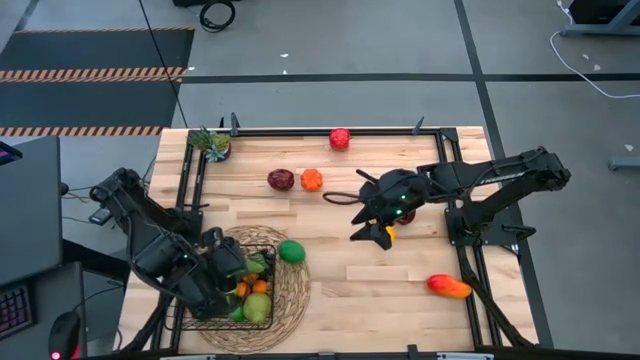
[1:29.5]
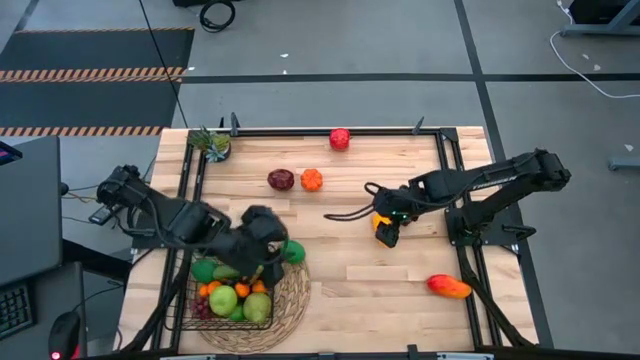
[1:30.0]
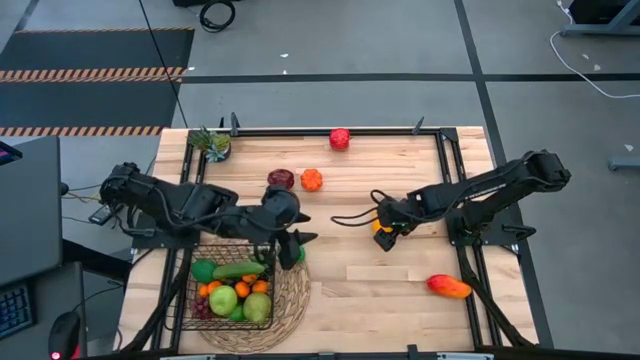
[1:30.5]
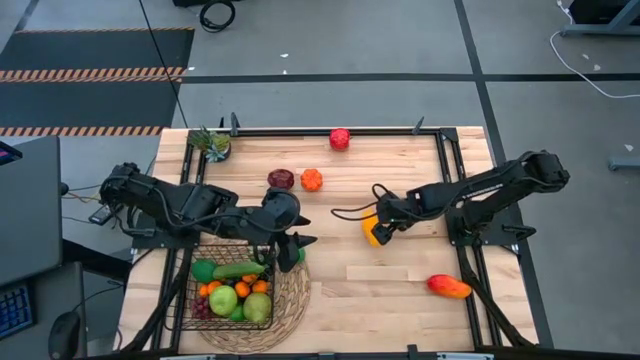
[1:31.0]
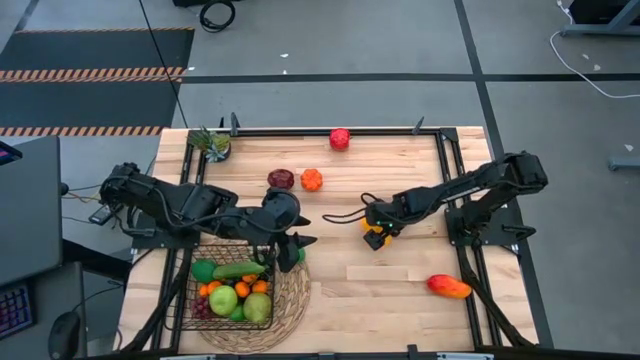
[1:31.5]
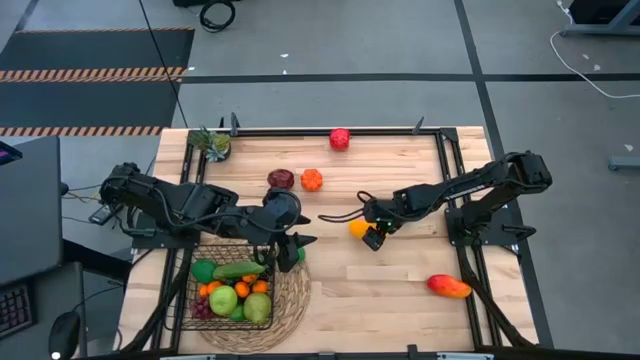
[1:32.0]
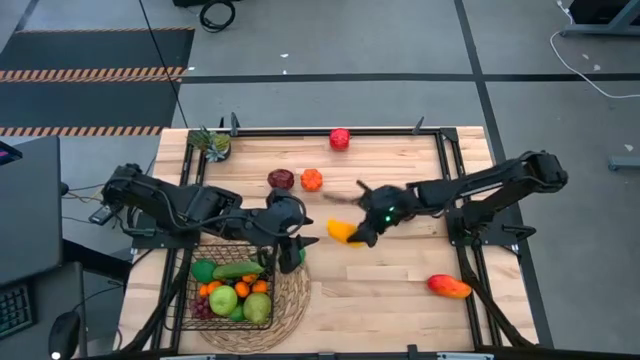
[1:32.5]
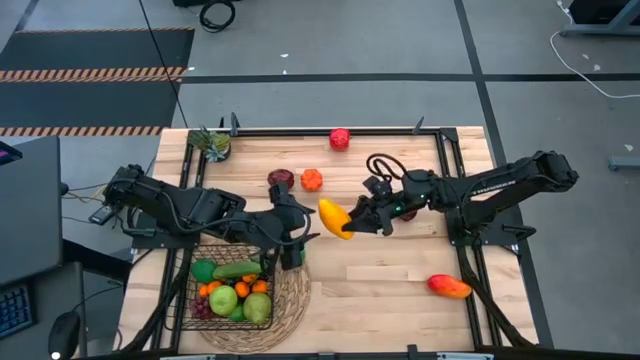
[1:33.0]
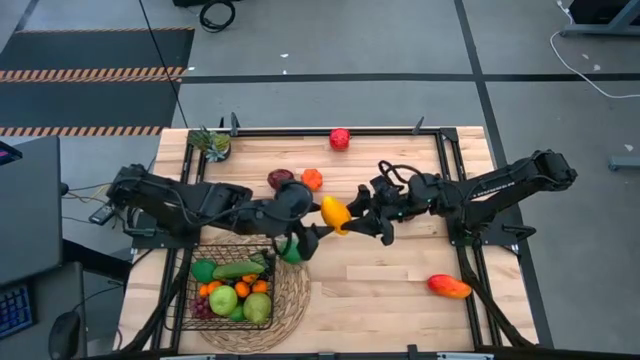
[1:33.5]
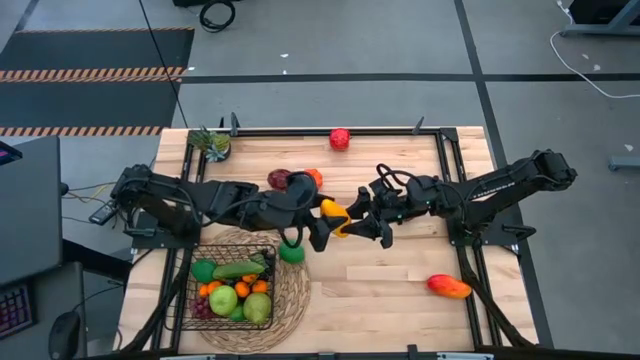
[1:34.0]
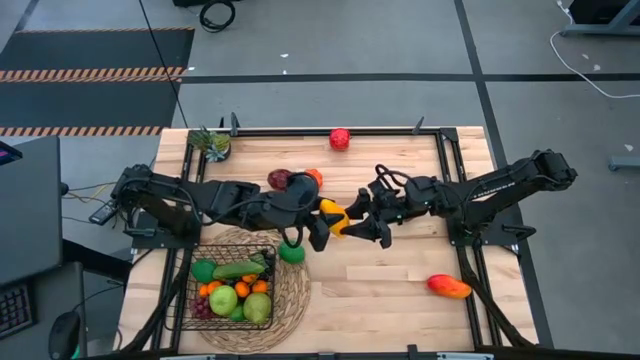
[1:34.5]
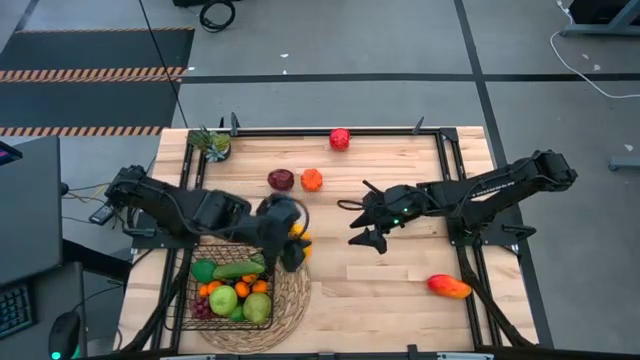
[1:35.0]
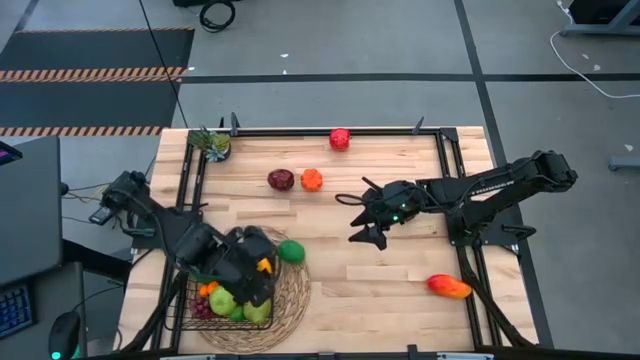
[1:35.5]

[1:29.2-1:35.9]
Task: Build produce basket
Put the yellow mango into the black wire basket

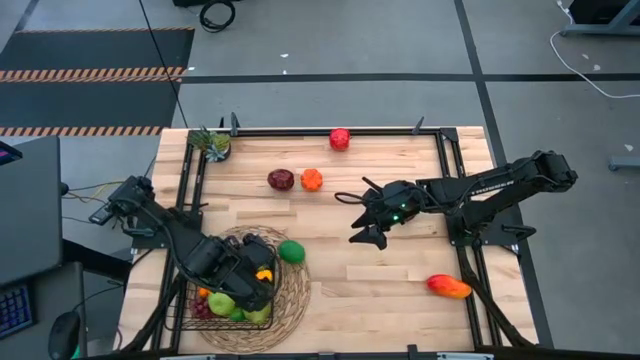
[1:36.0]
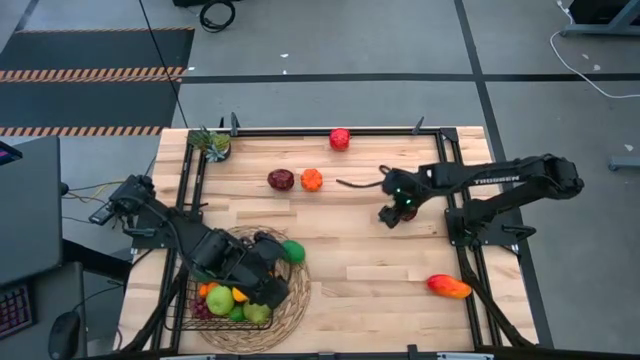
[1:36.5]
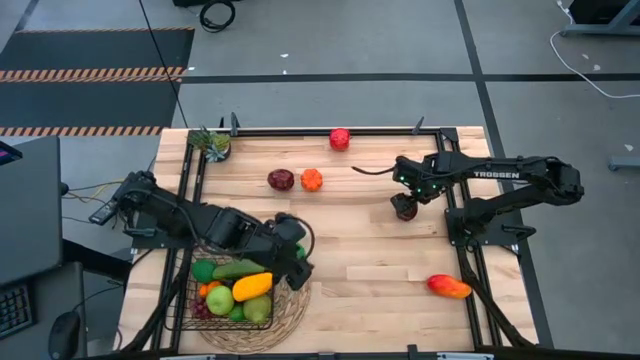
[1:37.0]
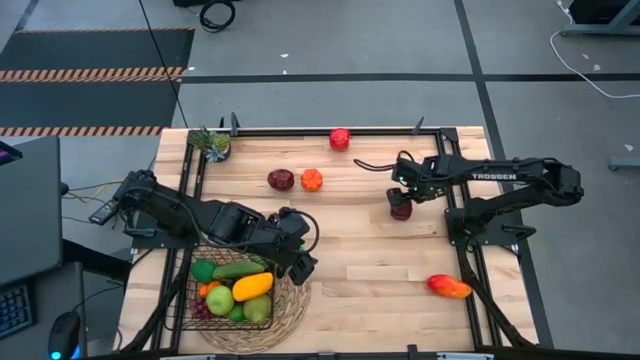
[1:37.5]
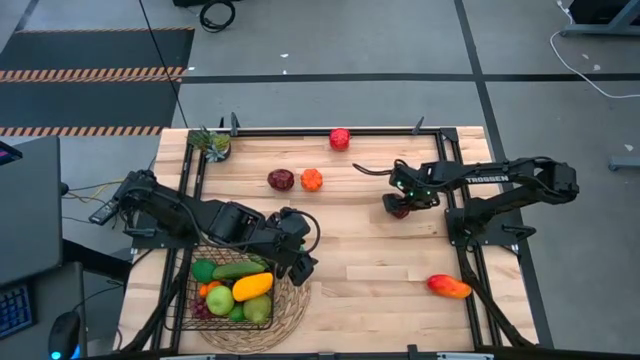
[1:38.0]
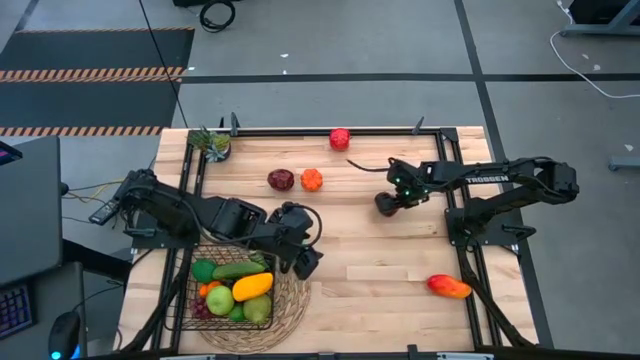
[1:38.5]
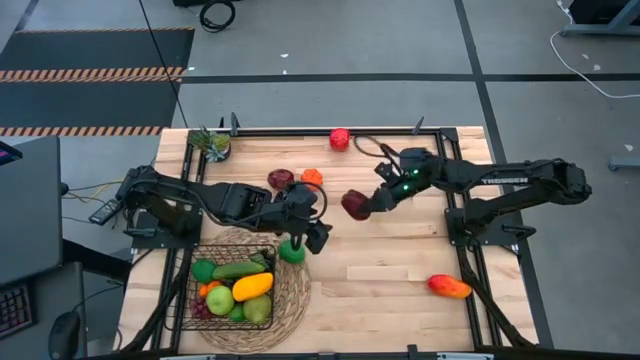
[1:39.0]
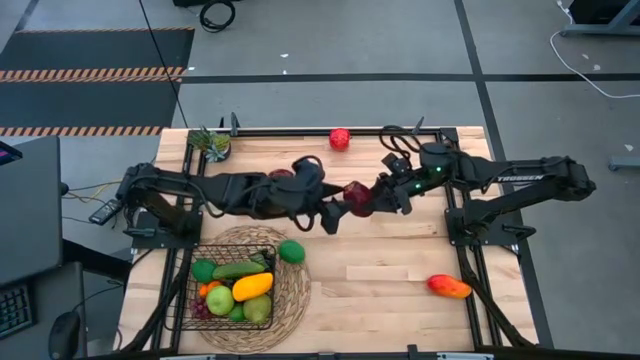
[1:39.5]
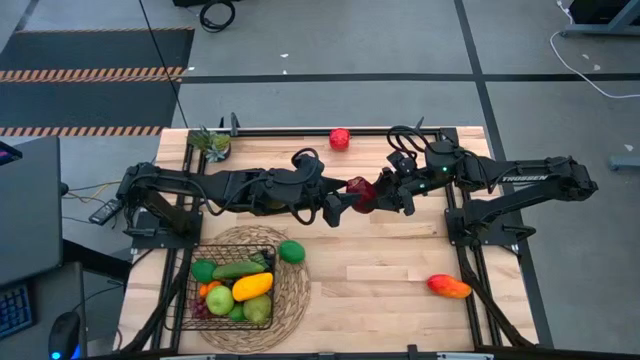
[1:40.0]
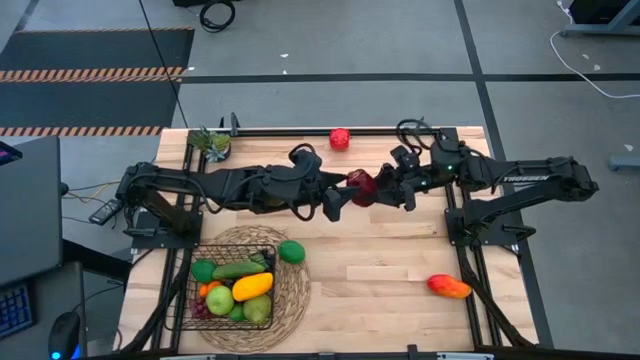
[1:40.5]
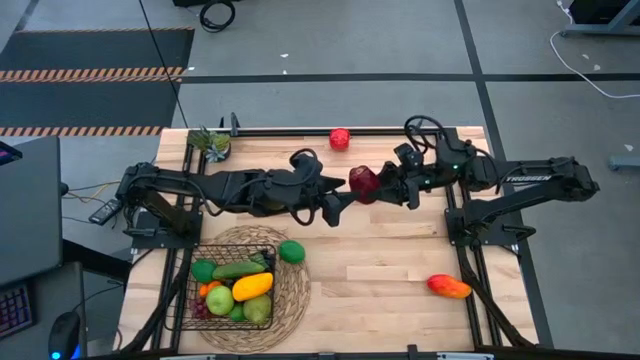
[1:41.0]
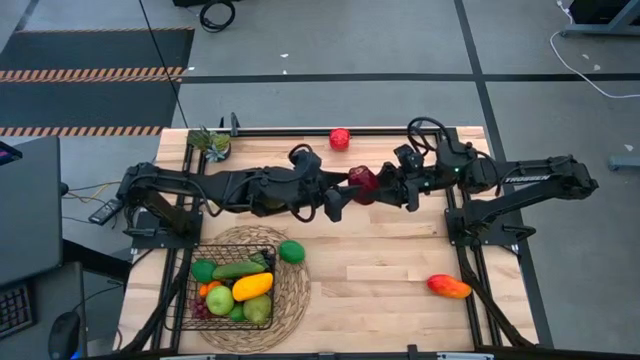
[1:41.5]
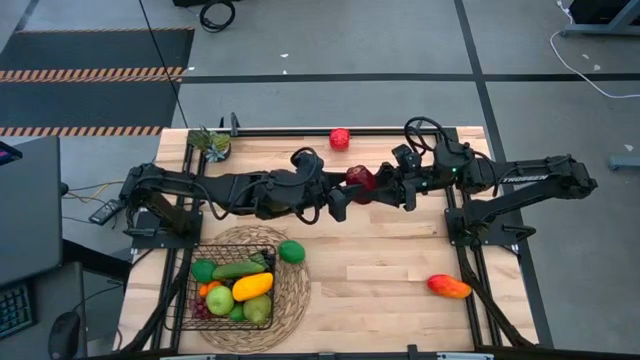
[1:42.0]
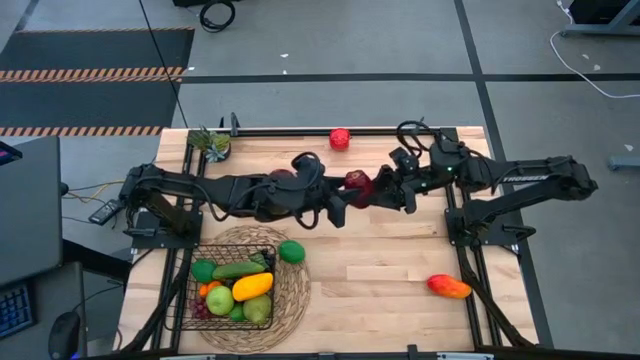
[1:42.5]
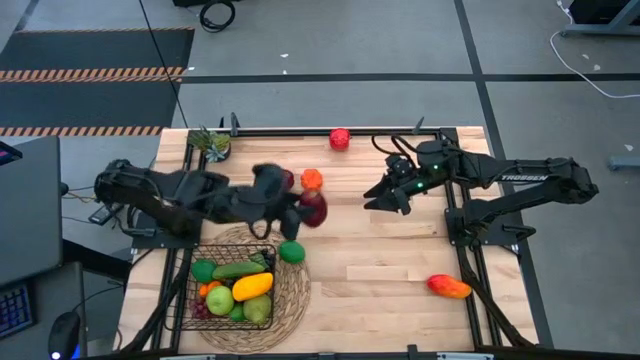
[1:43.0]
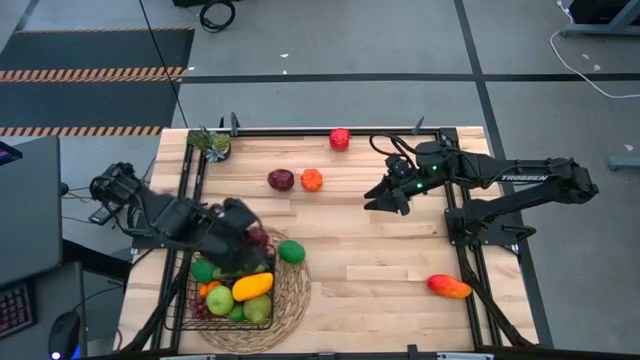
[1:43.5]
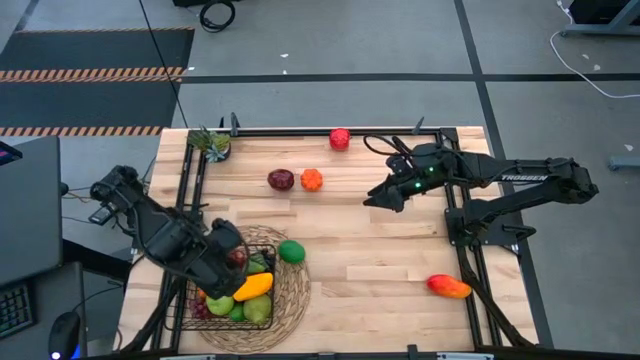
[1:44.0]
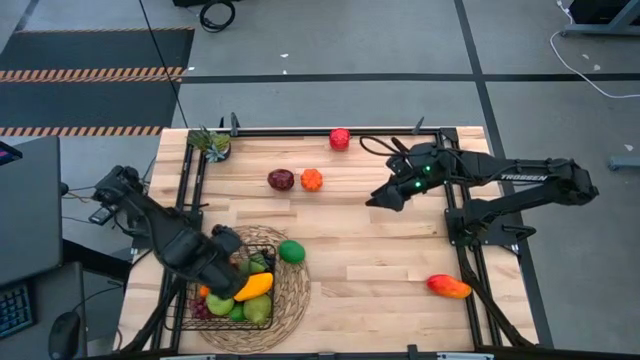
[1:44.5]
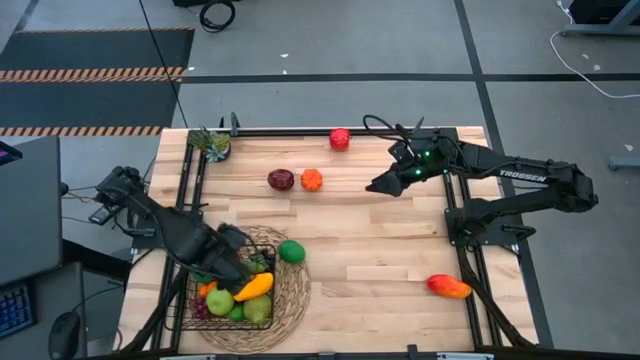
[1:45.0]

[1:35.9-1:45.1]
Put the bottom dark red apple into the black wire basket

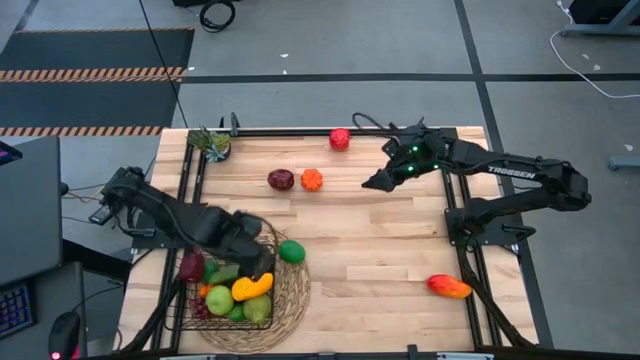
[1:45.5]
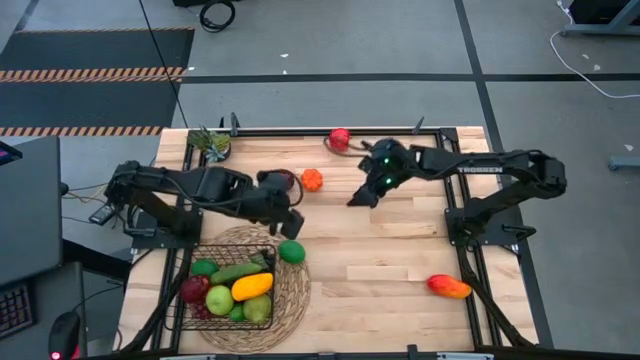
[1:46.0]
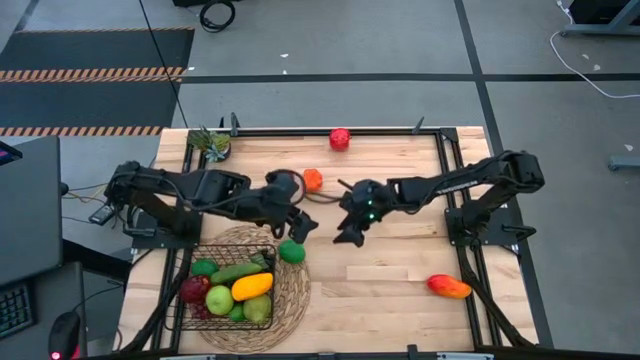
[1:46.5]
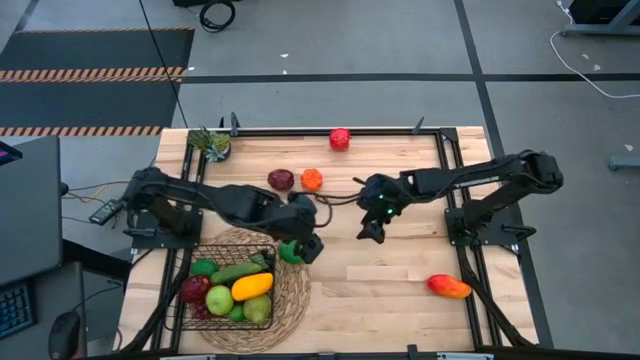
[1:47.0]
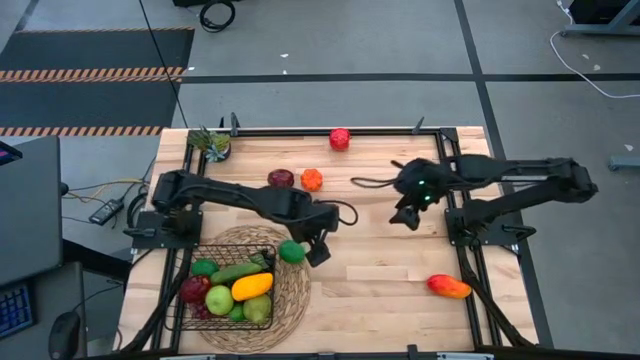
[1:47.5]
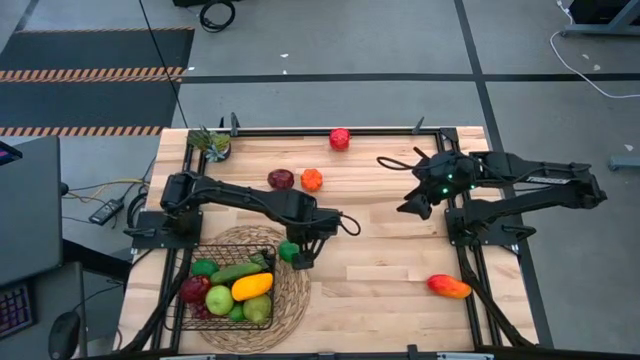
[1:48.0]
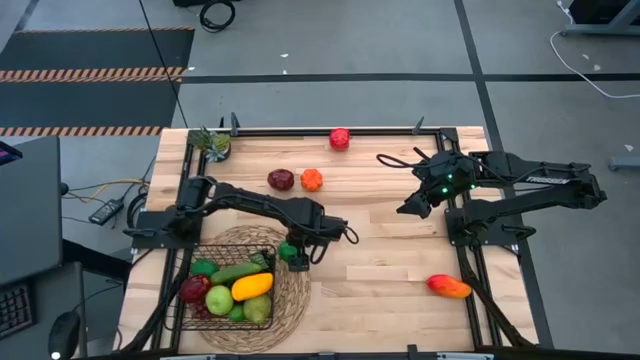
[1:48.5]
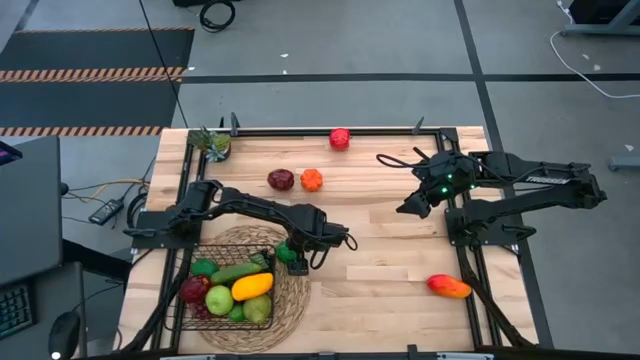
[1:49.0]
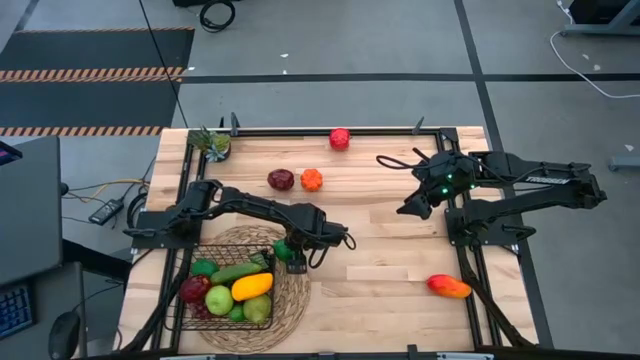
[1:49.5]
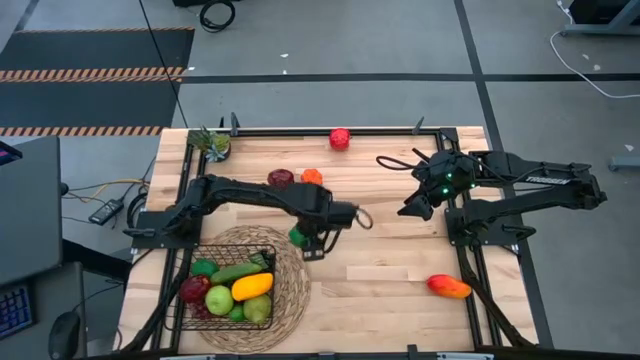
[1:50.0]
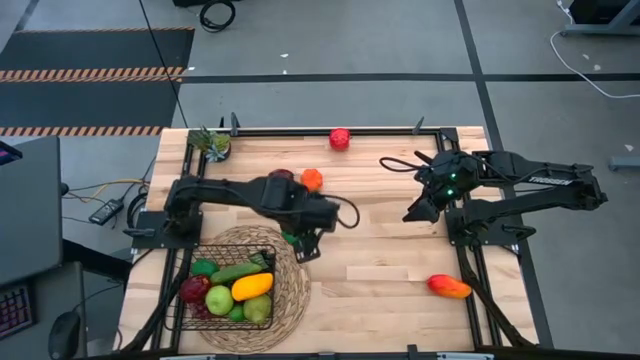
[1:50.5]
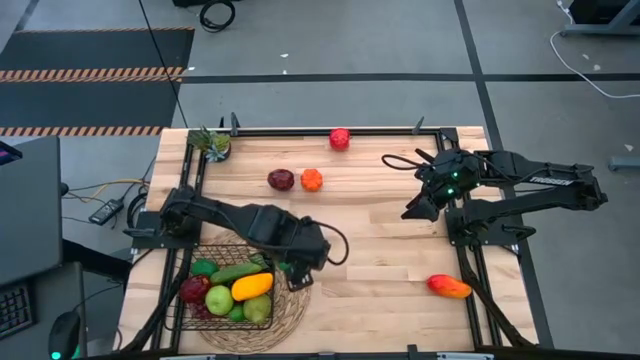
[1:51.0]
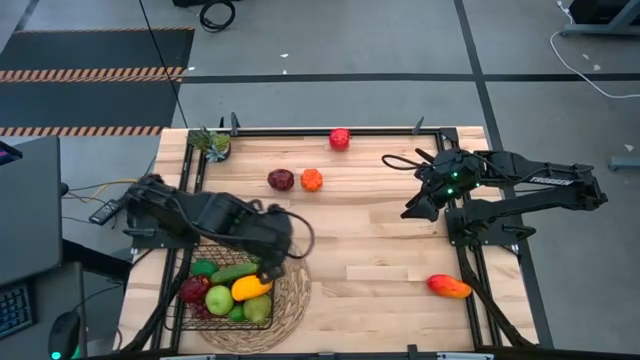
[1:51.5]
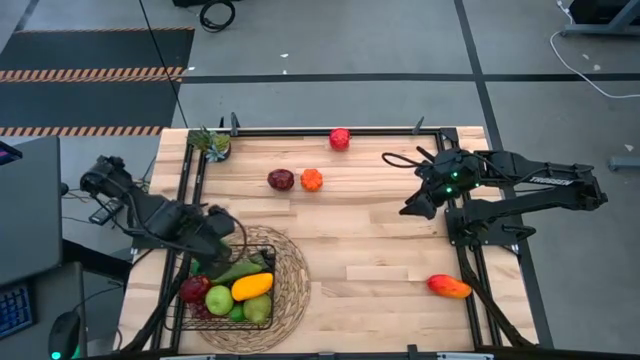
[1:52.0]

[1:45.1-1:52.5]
Put the lime into the black wire basket
